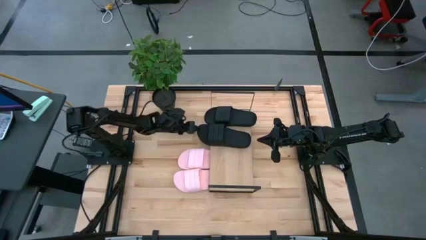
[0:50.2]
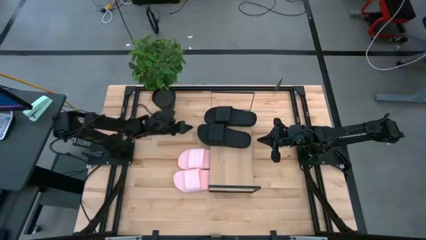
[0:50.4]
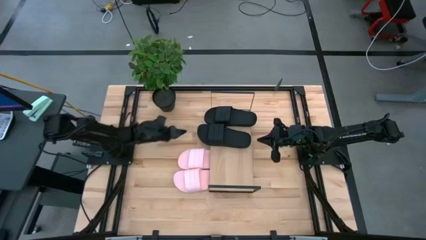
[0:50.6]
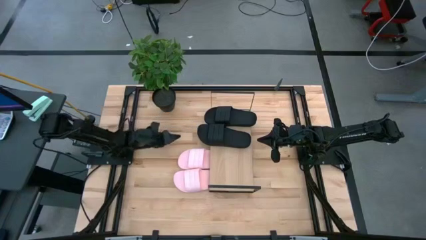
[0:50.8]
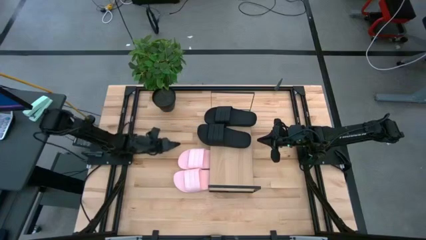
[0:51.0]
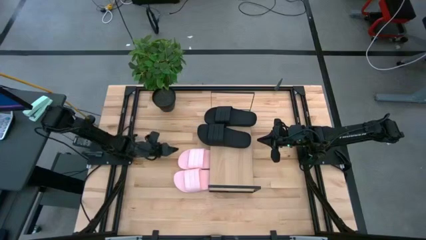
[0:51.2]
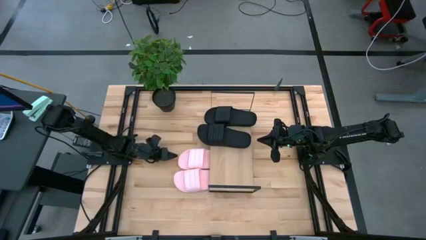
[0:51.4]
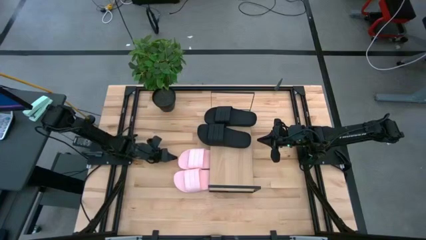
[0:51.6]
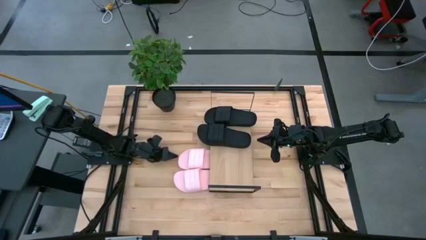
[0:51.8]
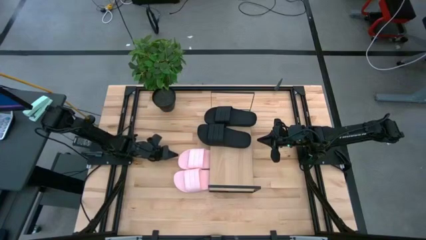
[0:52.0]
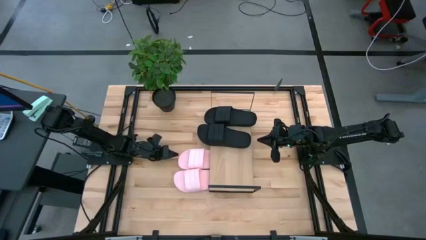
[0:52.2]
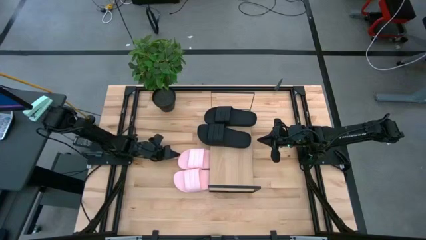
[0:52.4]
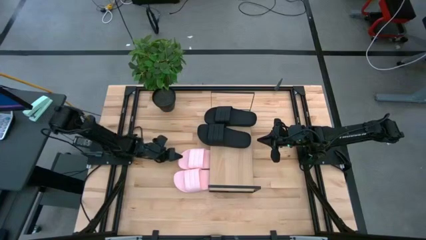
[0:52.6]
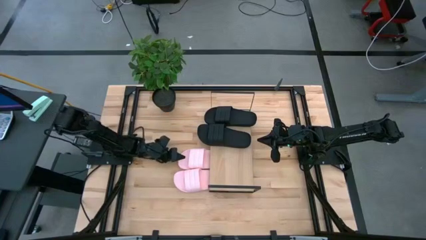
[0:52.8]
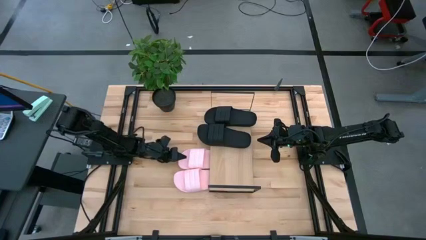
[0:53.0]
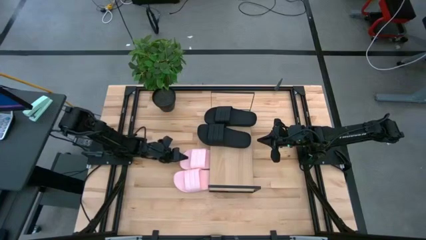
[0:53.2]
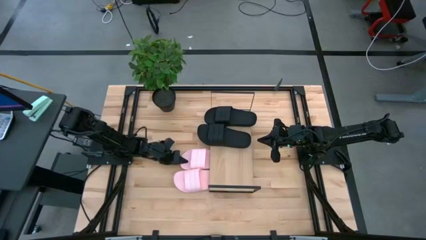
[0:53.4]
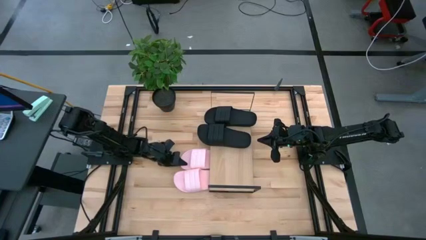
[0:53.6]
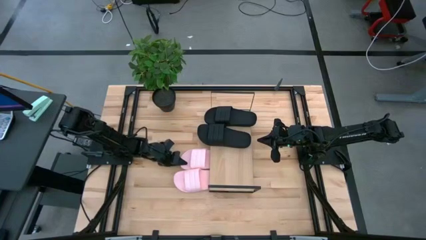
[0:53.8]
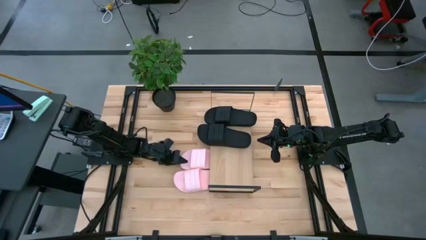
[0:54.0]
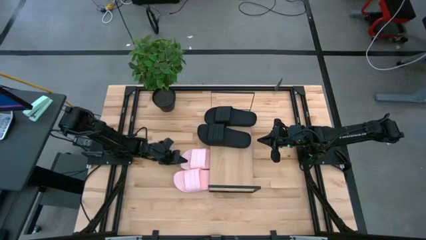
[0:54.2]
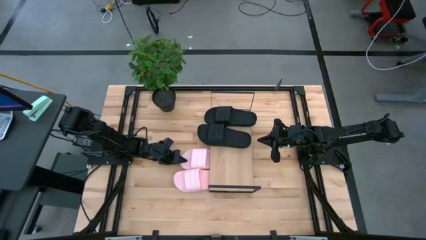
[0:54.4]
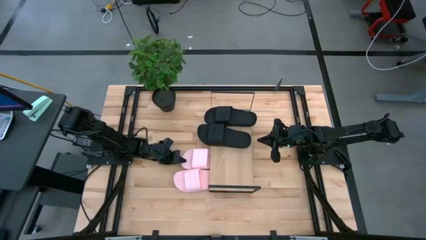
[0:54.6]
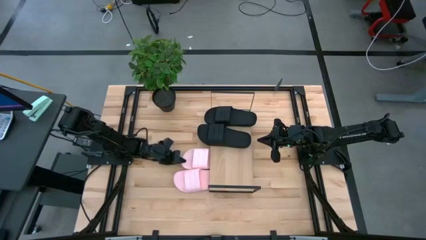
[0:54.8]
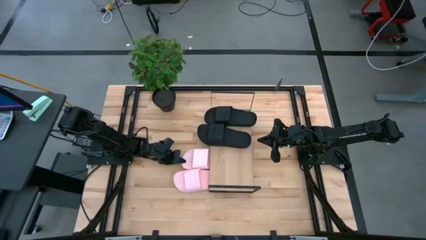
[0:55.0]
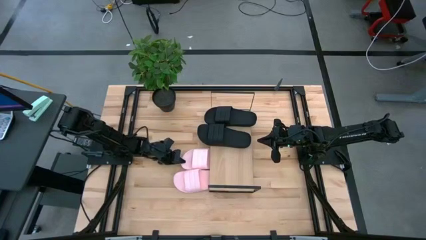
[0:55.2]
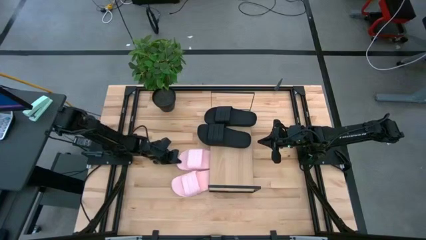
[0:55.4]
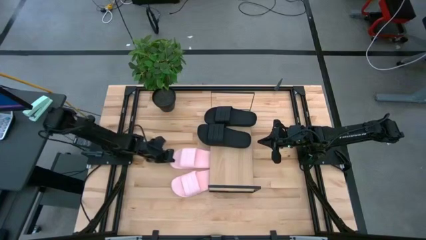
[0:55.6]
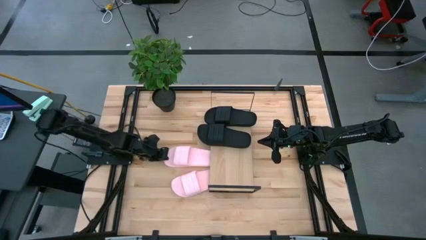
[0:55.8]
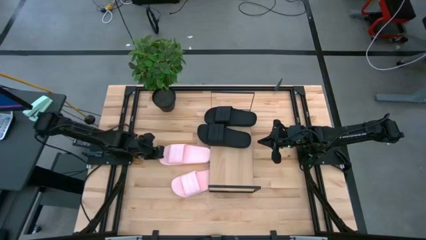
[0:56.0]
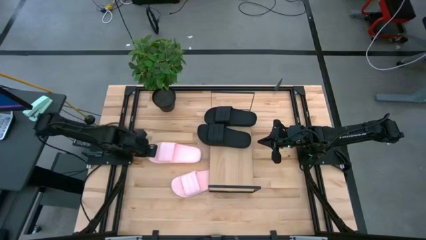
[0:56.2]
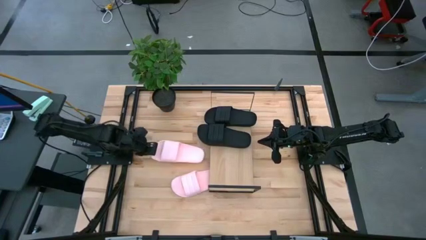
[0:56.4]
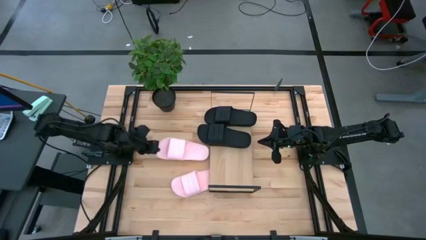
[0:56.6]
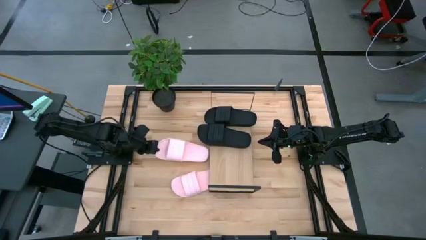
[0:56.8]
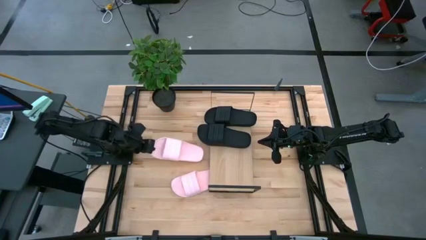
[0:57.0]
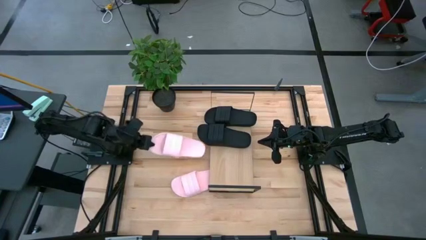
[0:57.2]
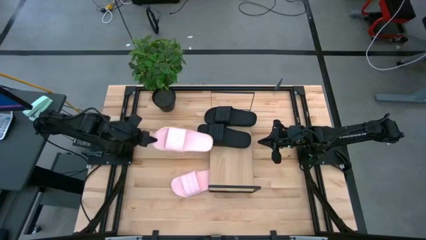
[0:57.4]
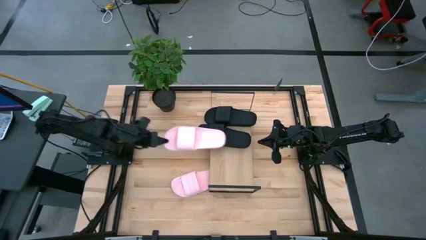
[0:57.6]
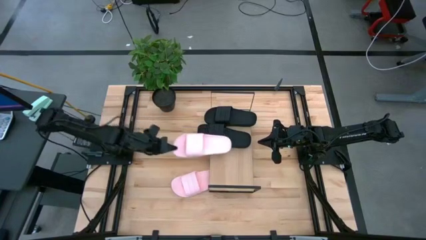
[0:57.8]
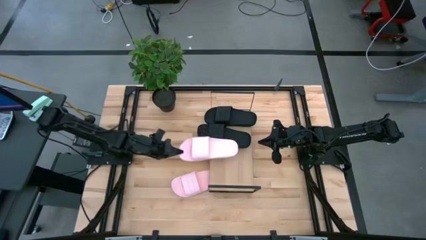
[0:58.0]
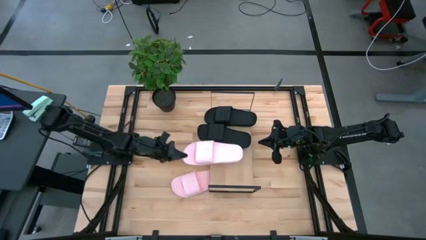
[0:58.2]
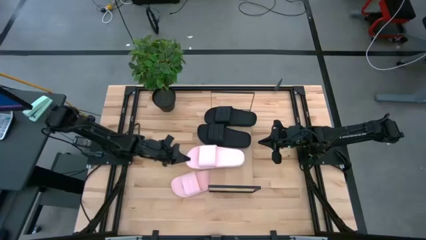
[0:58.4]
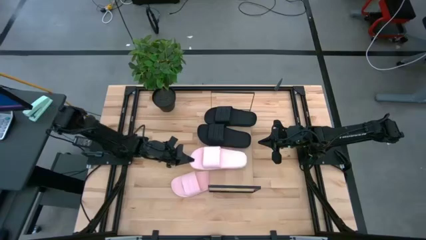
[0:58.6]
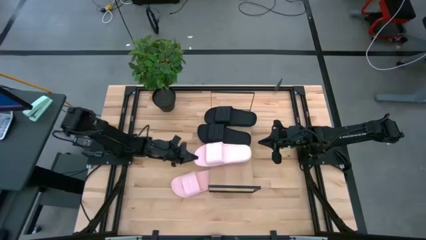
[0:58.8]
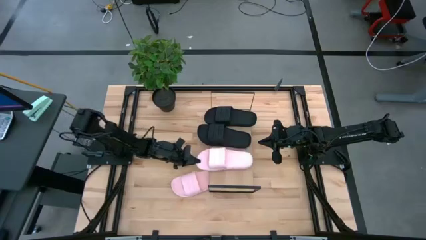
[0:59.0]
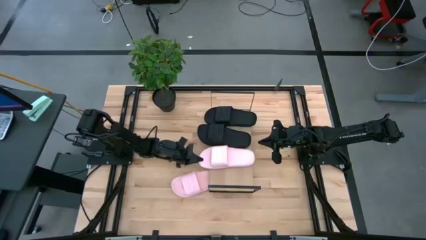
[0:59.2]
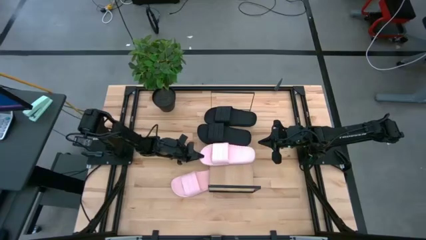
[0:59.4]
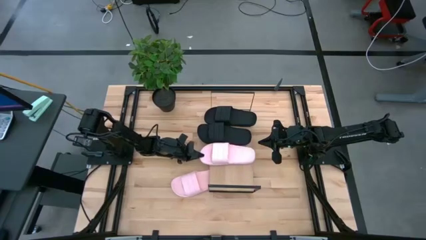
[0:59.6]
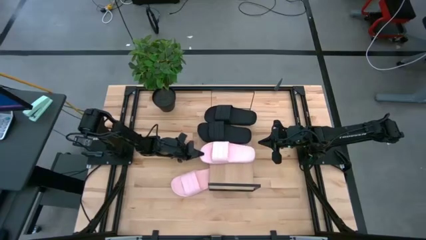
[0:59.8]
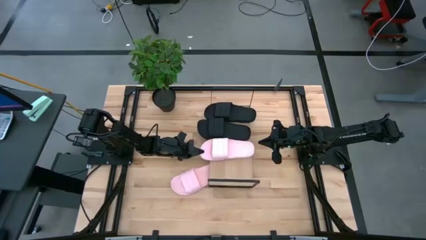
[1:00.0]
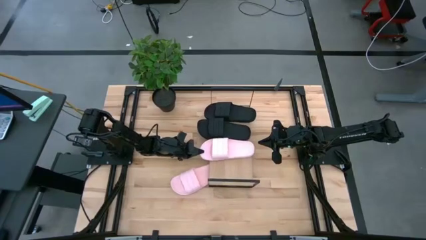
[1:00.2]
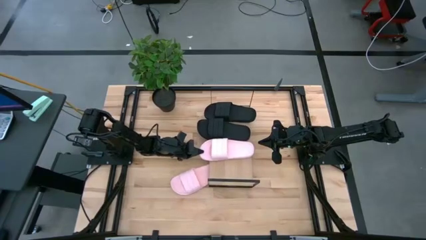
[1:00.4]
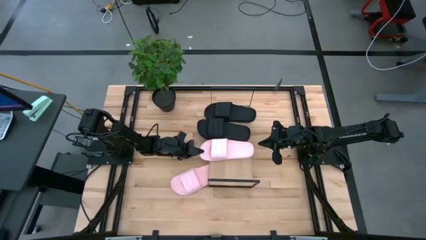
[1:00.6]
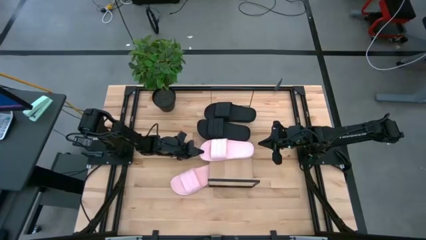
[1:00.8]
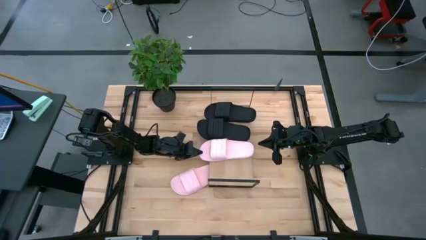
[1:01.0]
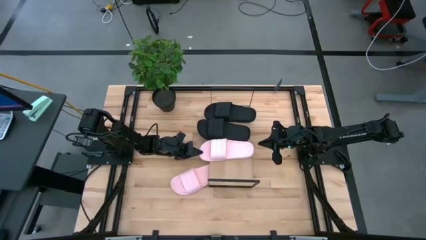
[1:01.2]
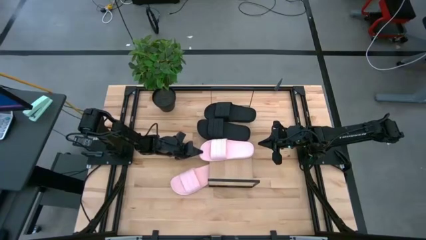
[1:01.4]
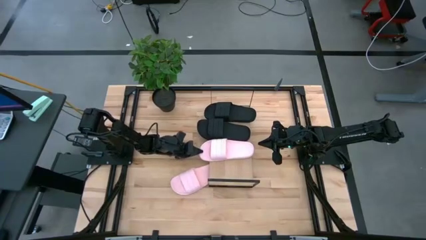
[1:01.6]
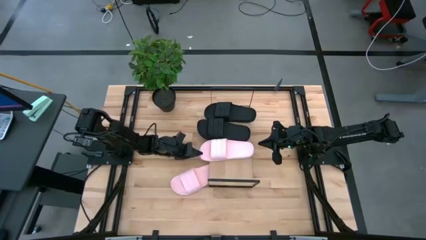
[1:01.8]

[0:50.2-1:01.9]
Task: Pick and place slides into the shelf
Put the top pink slides on the shelf

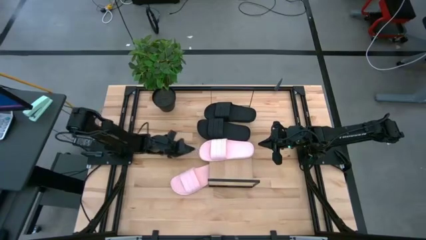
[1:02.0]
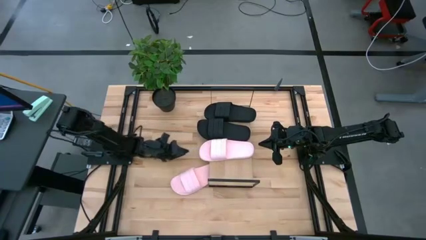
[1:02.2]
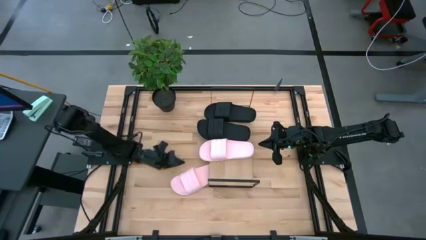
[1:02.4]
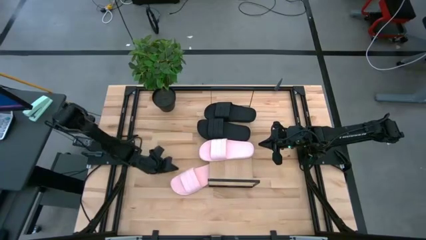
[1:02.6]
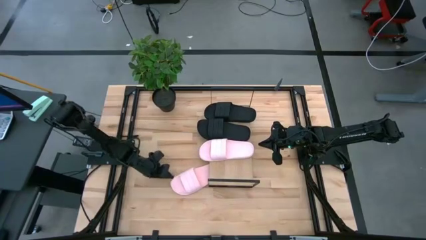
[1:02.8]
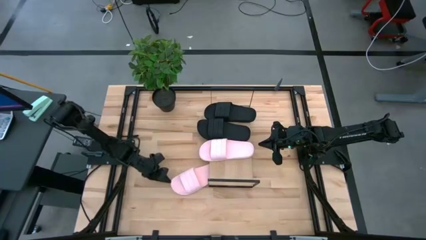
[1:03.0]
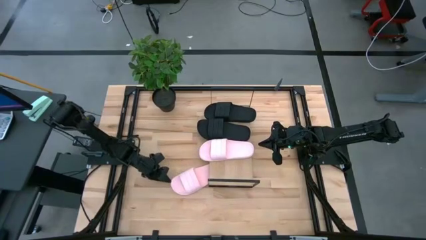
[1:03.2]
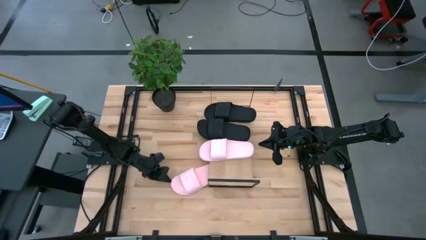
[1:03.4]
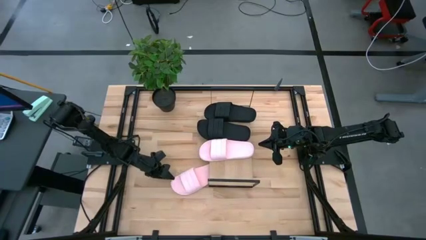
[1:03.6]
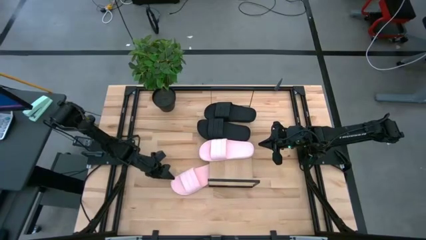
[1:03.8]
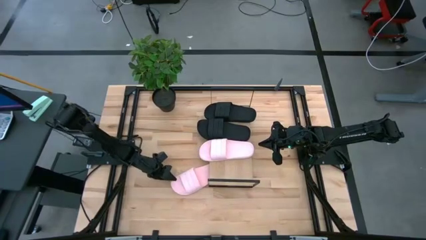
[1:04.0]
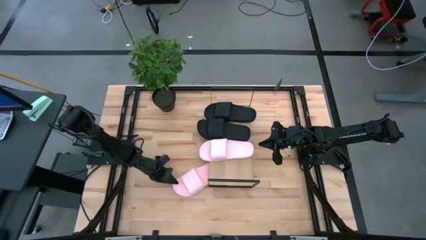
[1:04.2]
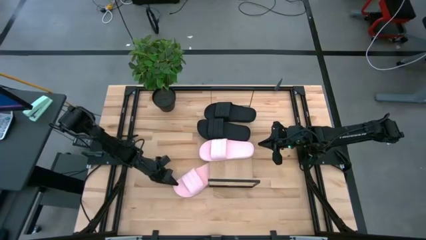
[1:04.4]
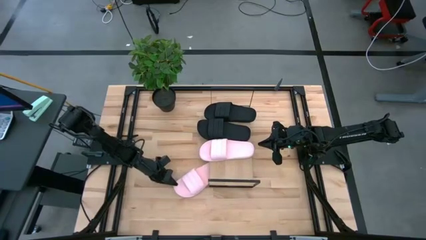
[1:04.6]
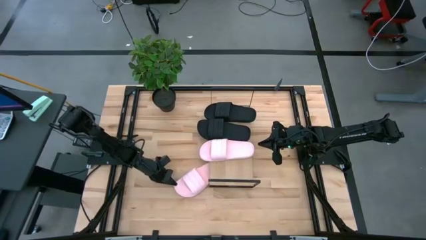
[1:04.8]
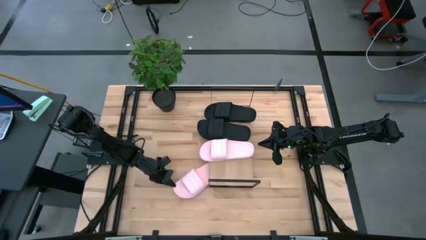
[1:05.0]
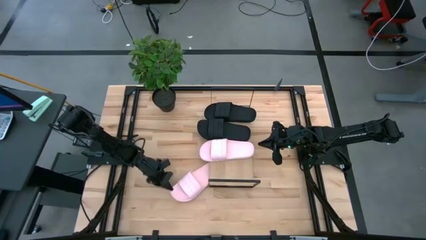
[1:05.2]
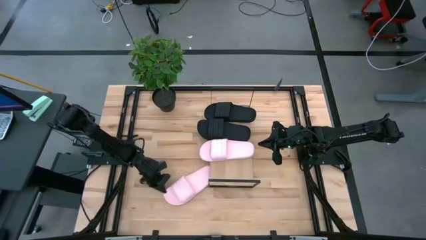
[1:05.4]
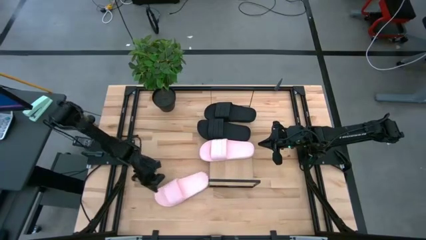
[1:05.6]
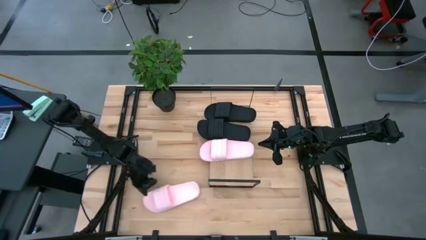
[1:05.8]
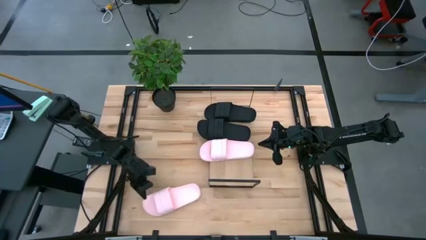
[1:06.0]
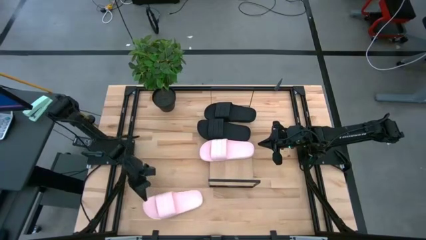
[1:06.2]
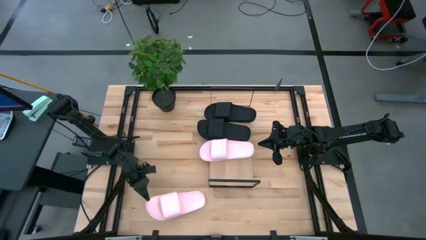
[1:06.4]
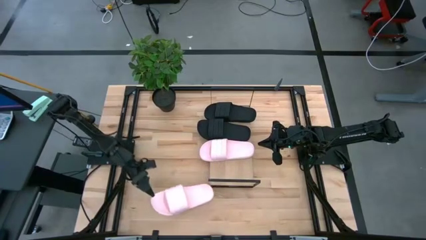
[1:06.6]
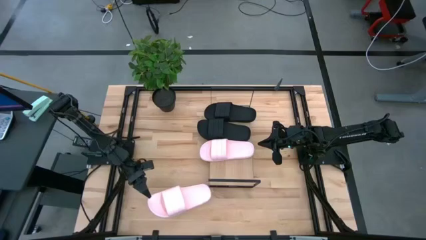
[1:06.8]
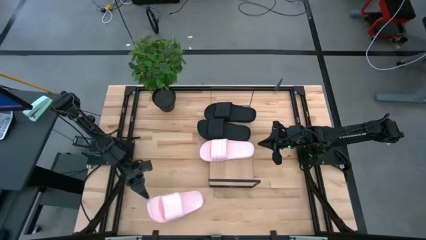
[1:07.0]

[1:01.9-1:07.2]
Put the pink slides on the shelf
